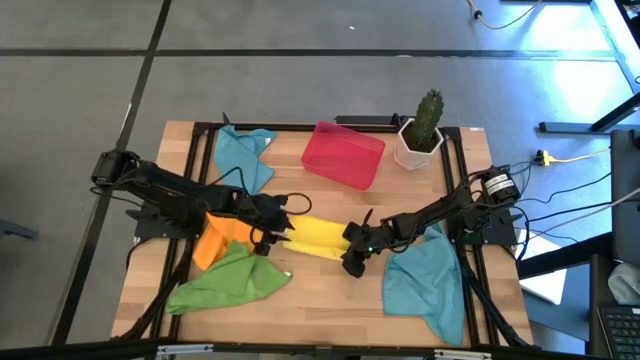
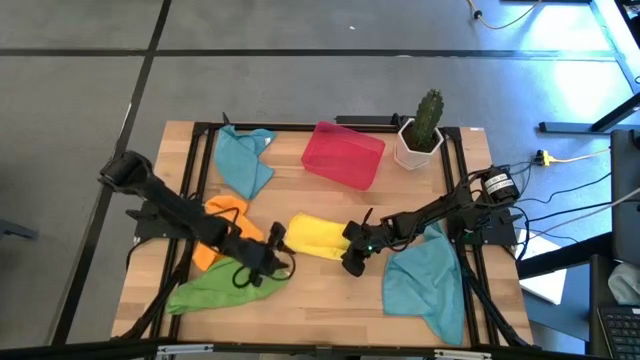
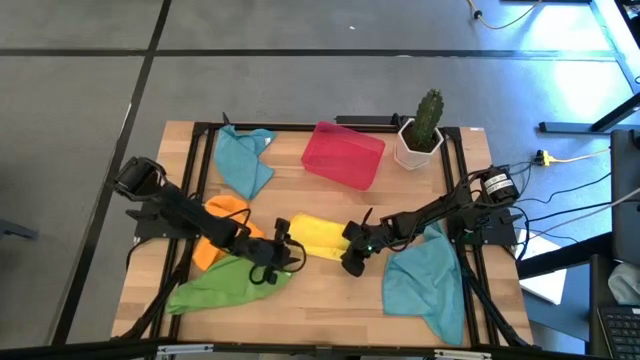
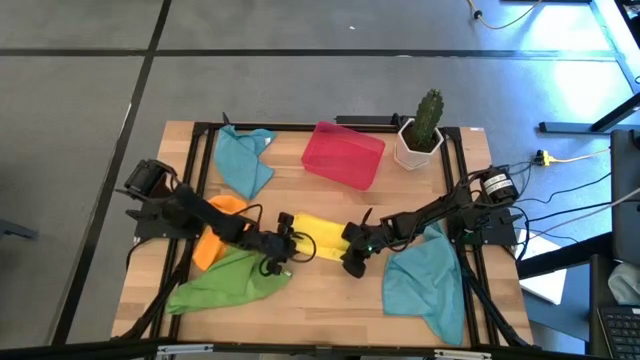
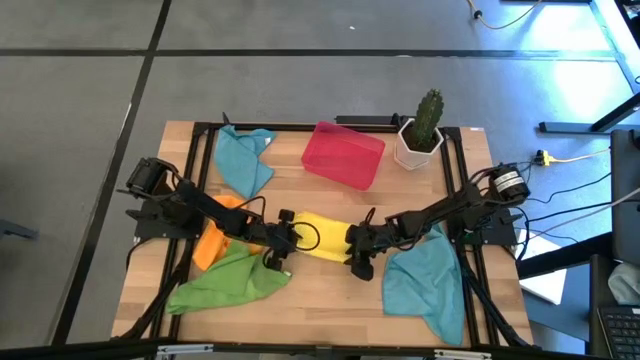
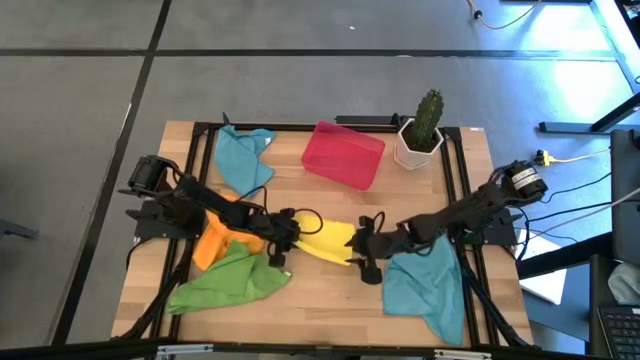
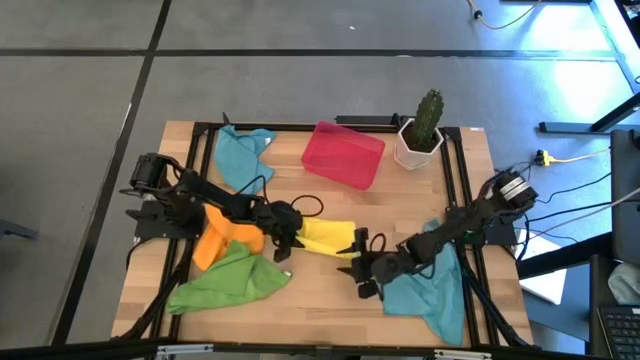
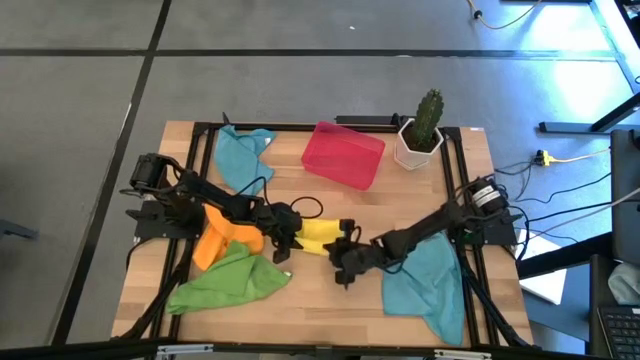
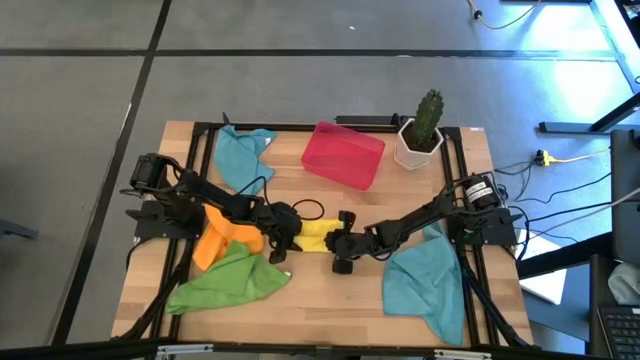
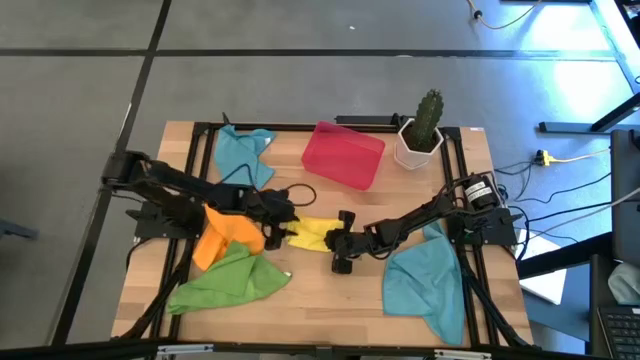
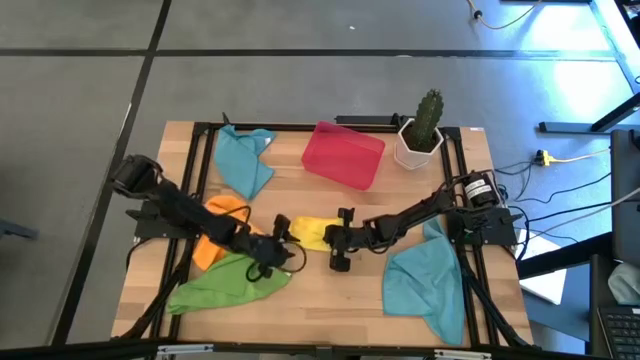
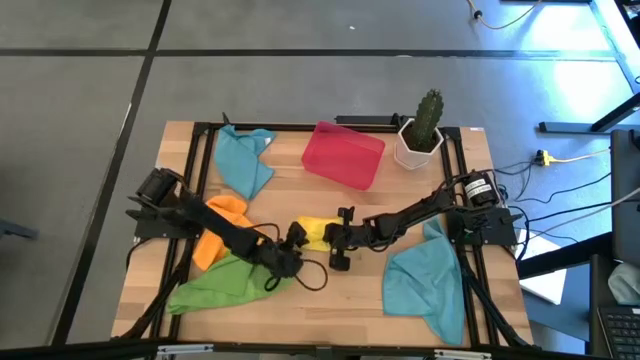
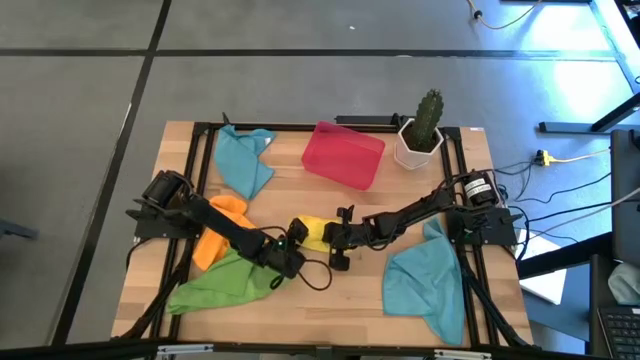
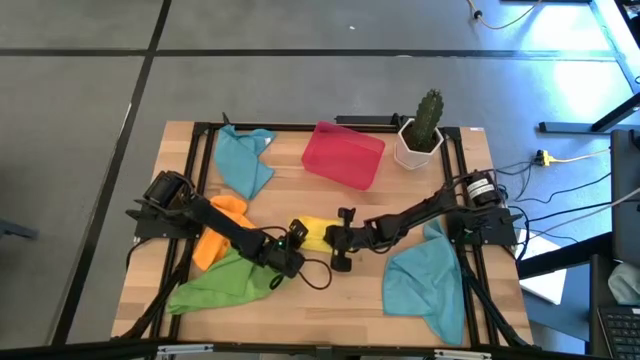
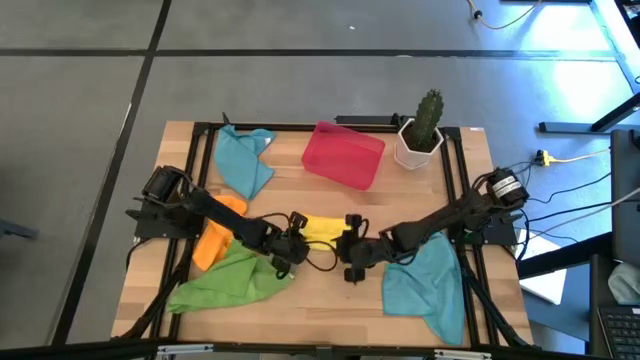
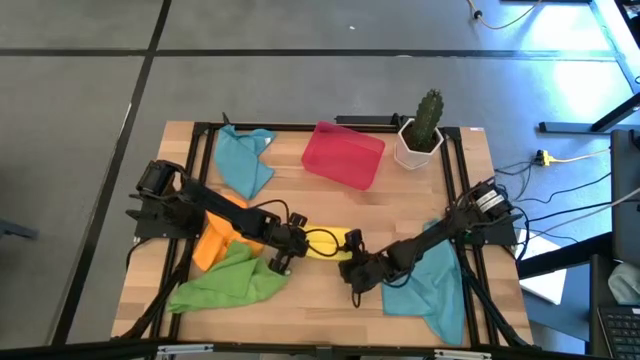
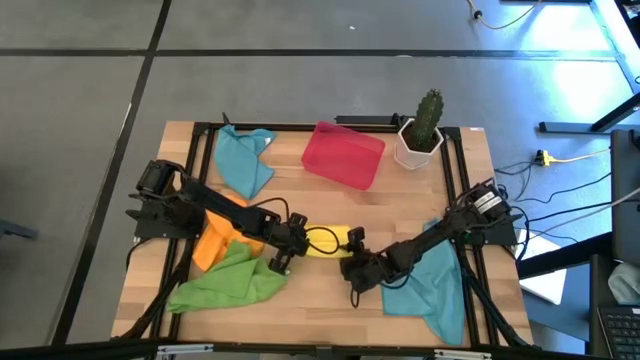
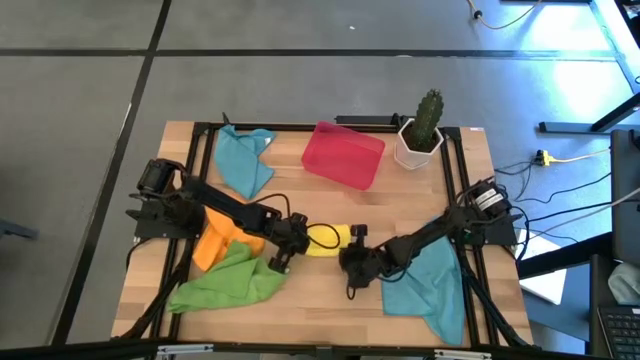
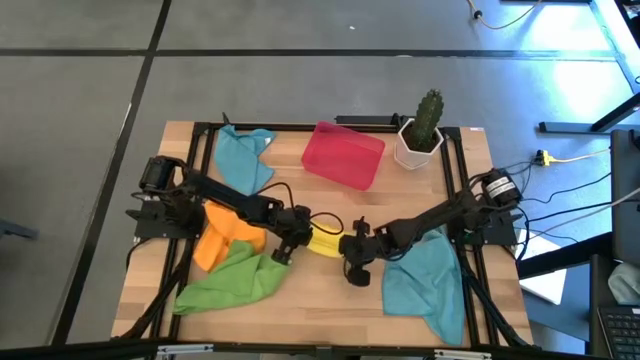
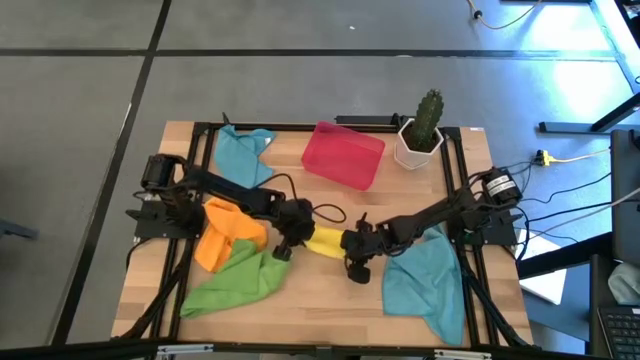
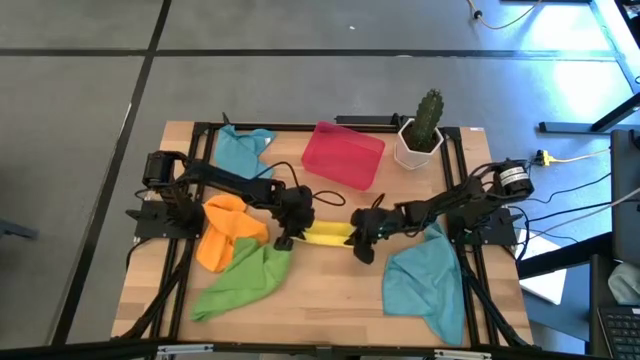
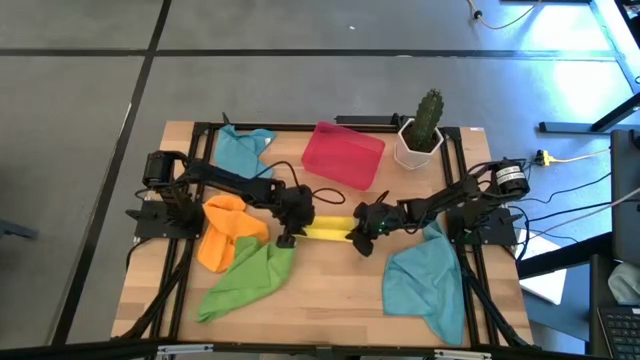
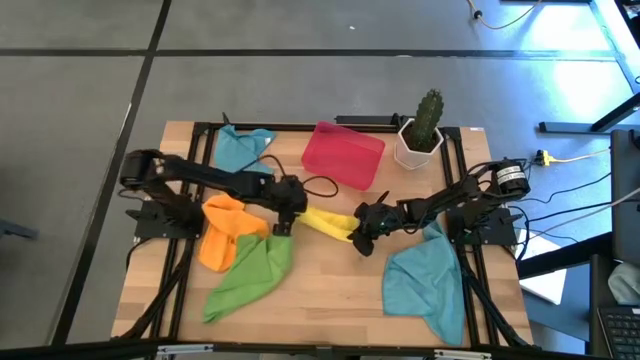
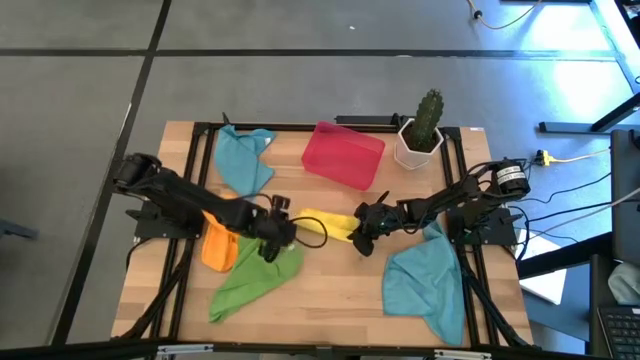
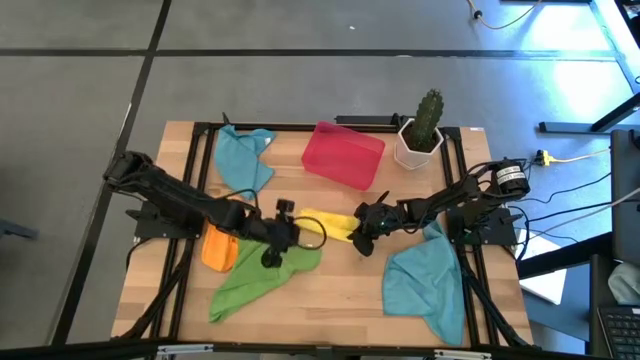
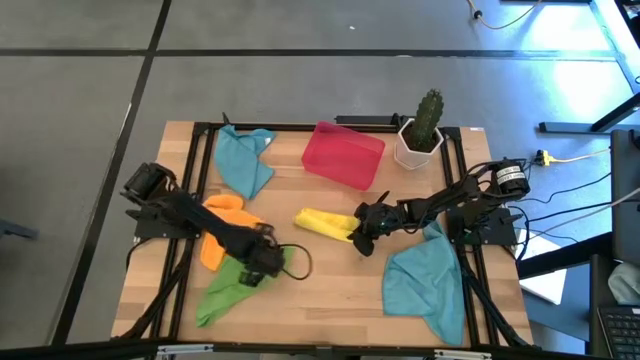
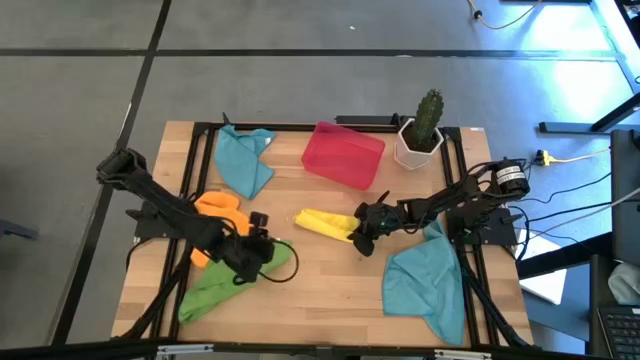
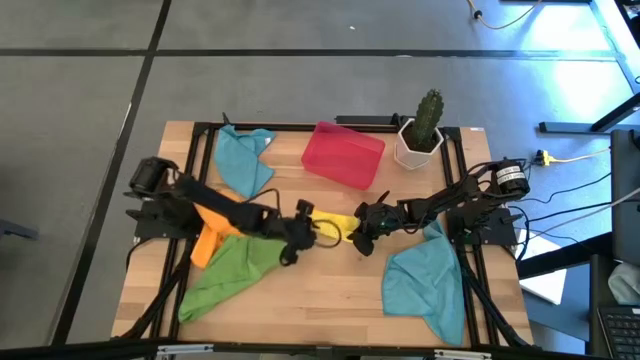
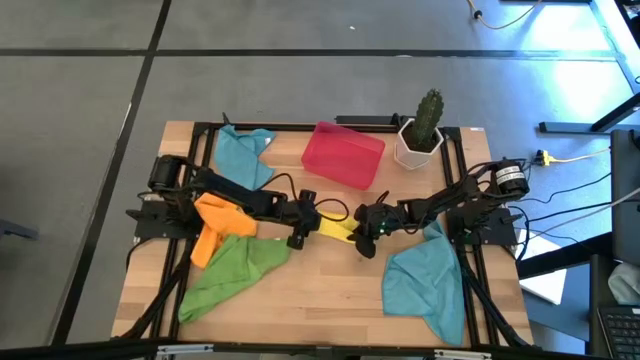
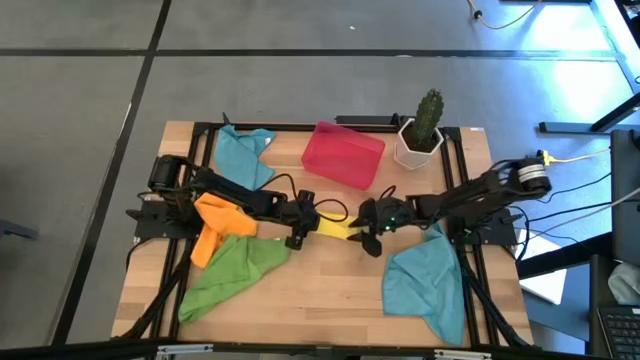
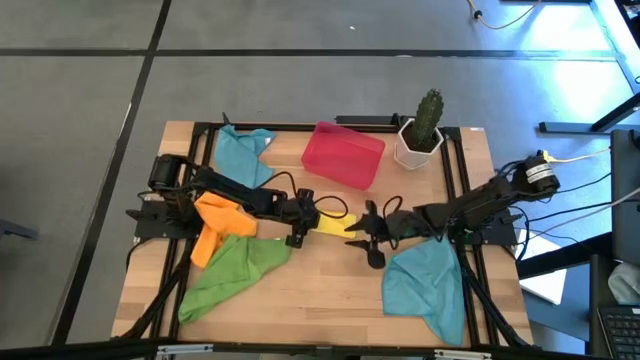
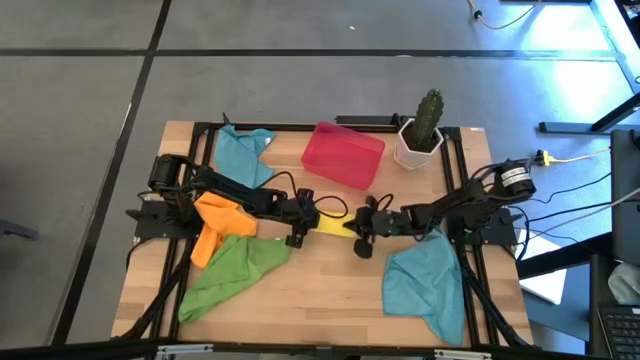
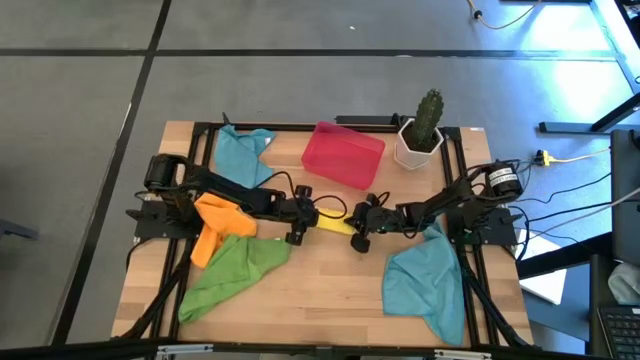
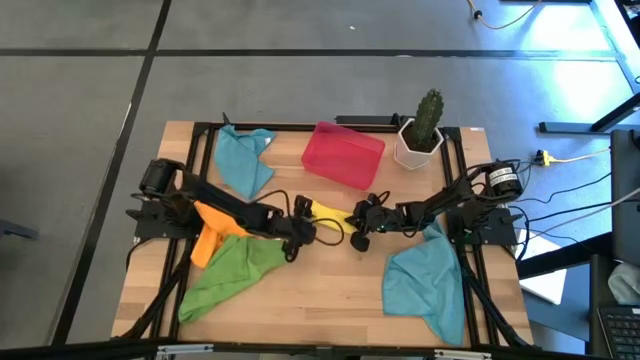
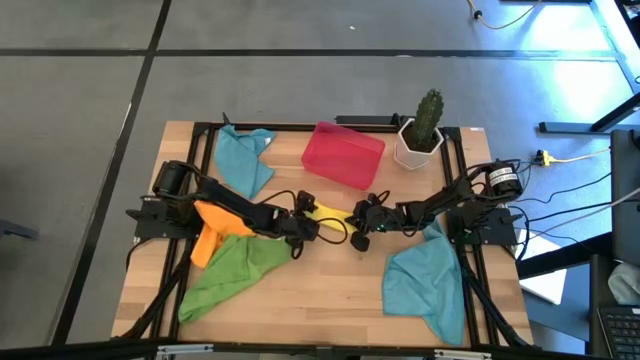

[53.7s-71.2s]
Task: Roll microfiber towels into tight, uniform cylinder then place into a basket
Roll the yellow towel

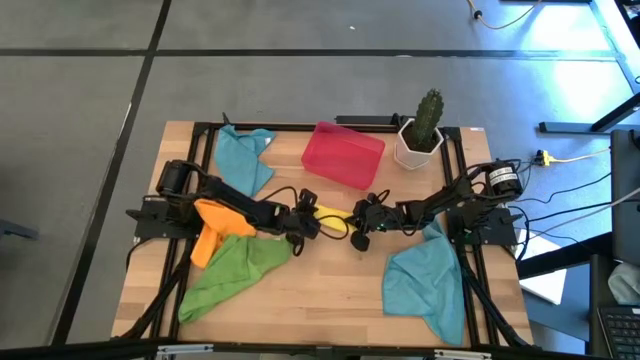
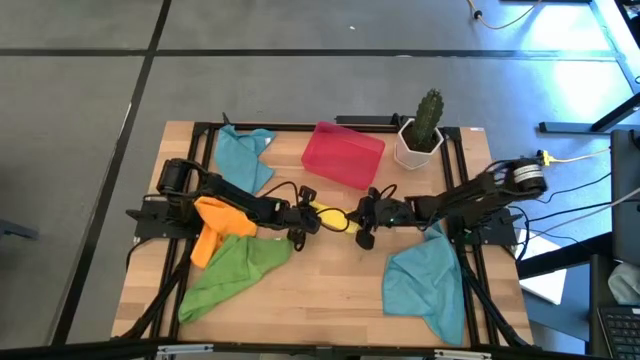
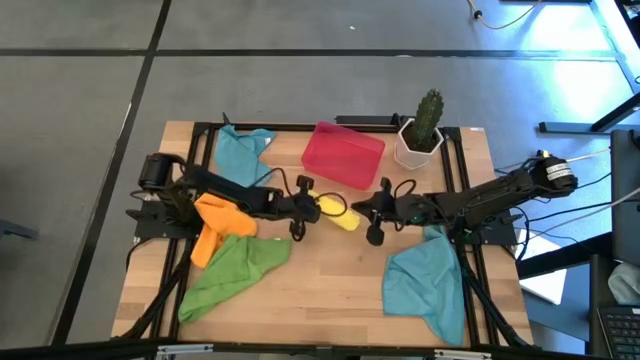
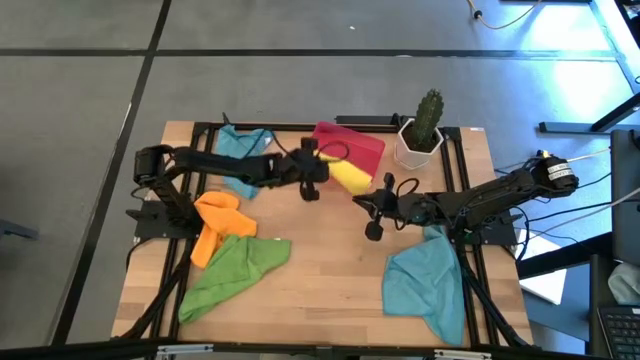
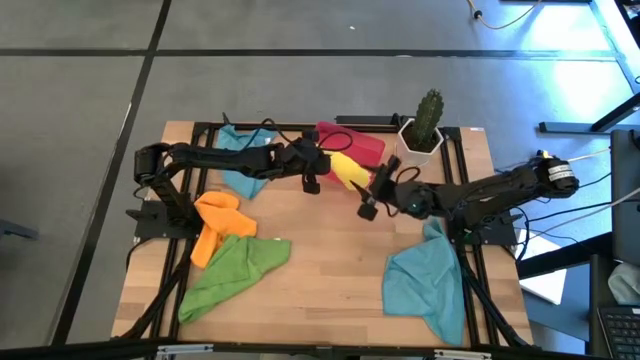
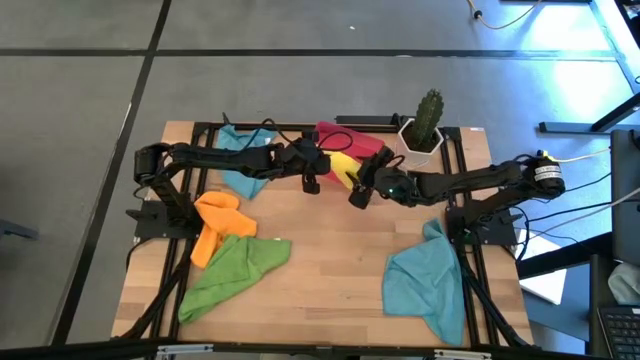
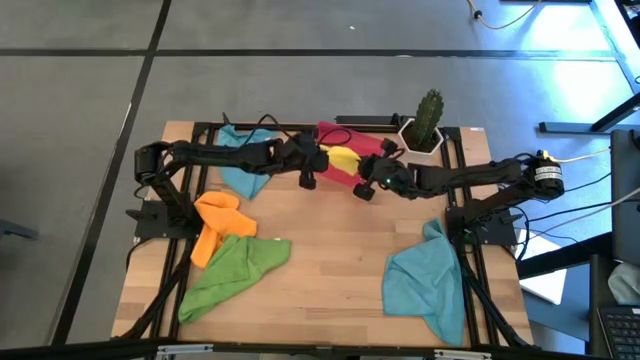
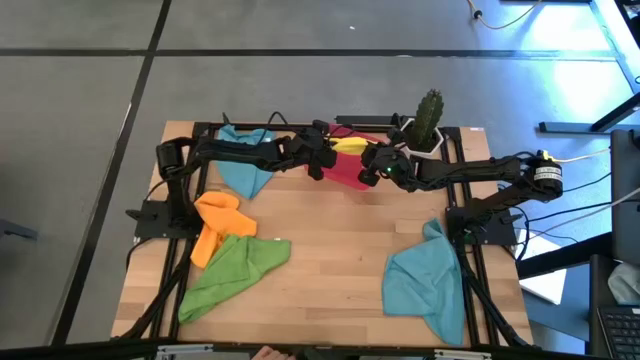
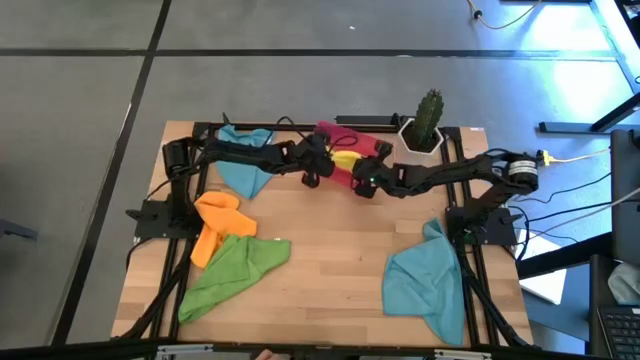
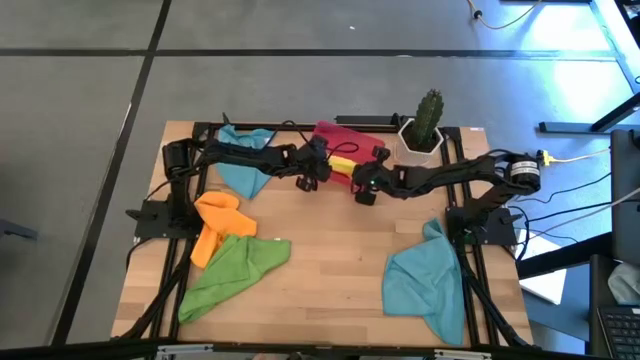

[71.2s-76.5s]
Put the rolled yellow towel into the red bin
